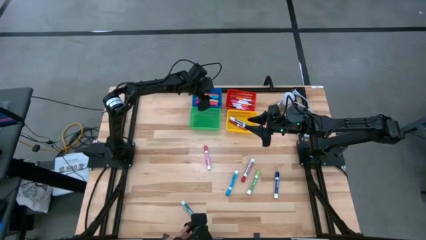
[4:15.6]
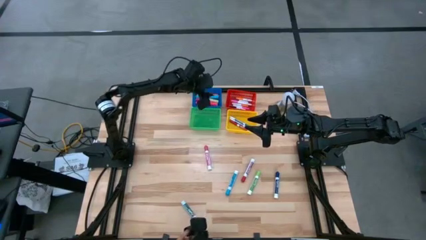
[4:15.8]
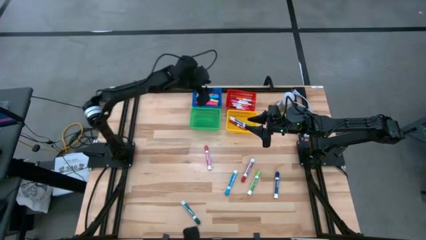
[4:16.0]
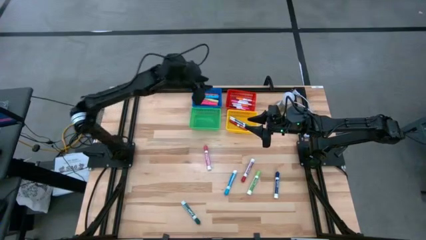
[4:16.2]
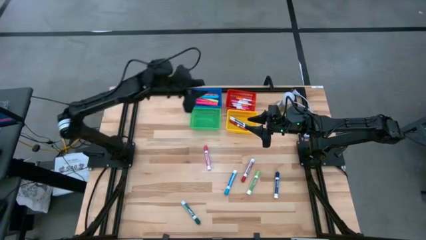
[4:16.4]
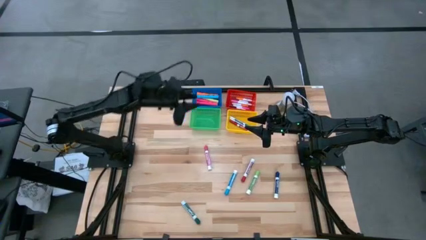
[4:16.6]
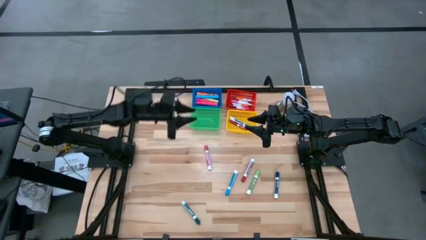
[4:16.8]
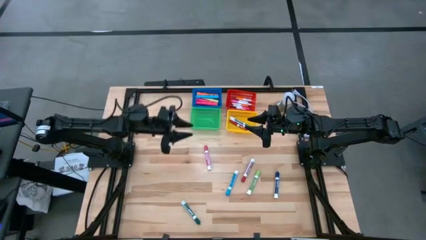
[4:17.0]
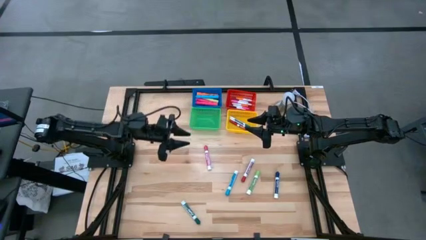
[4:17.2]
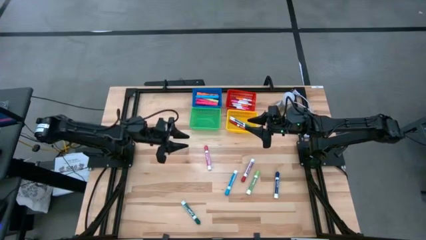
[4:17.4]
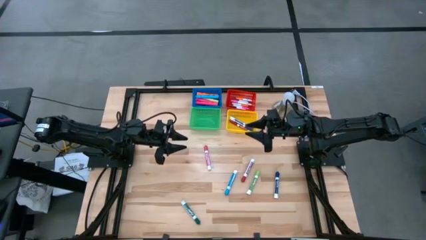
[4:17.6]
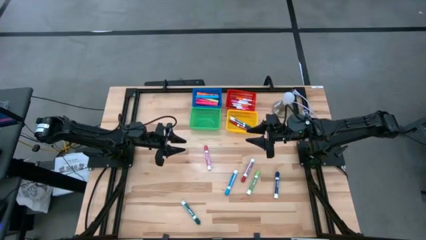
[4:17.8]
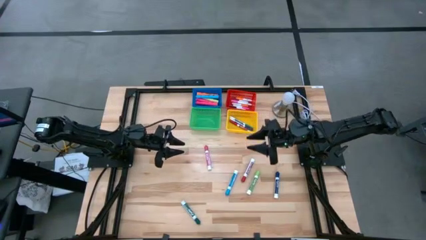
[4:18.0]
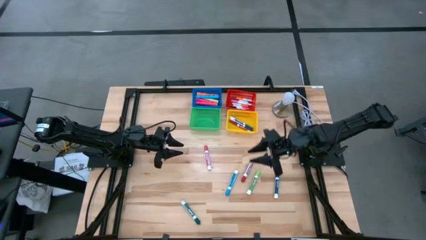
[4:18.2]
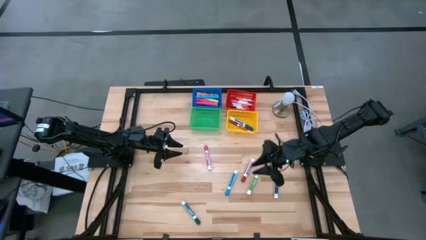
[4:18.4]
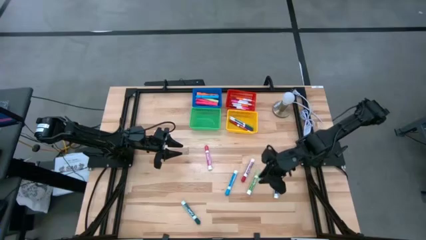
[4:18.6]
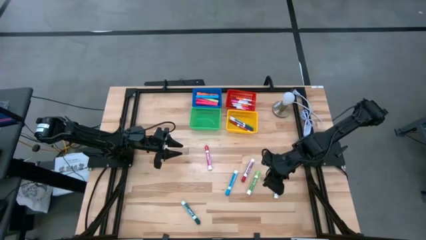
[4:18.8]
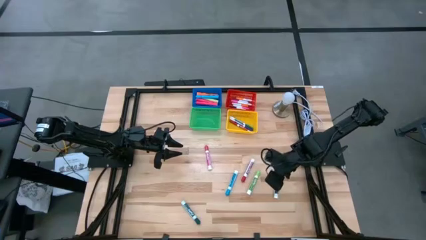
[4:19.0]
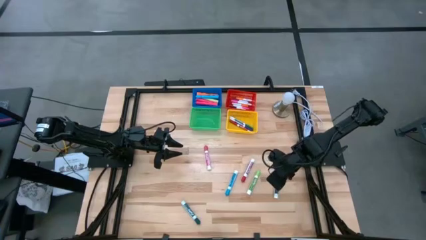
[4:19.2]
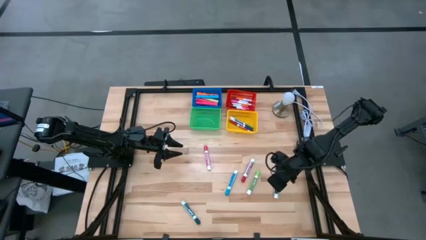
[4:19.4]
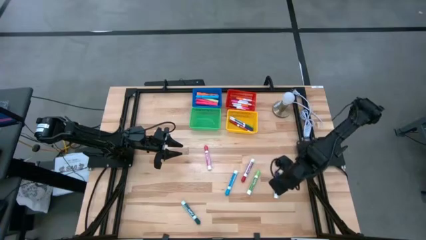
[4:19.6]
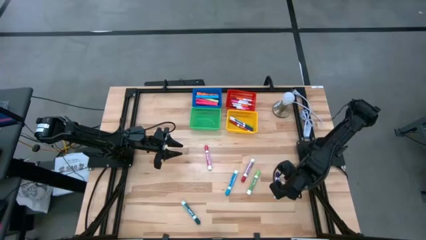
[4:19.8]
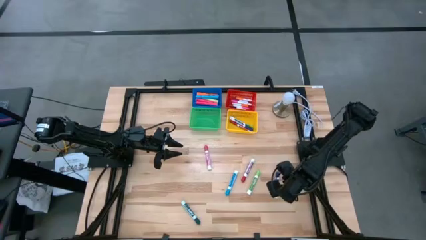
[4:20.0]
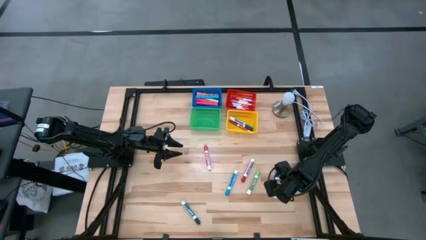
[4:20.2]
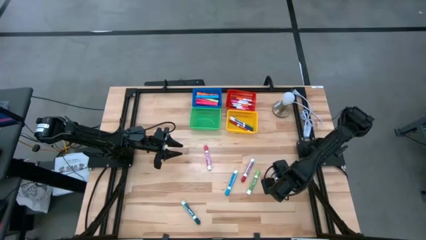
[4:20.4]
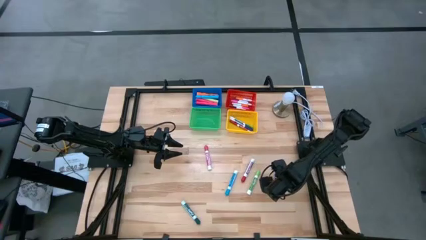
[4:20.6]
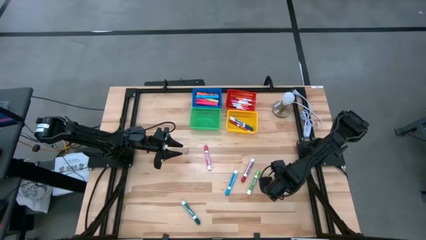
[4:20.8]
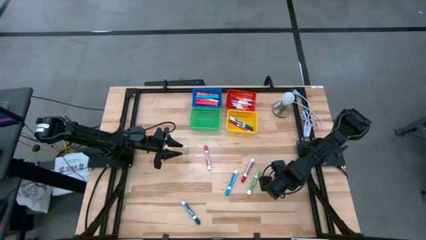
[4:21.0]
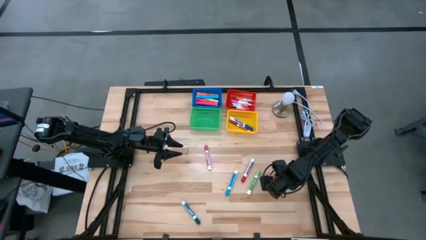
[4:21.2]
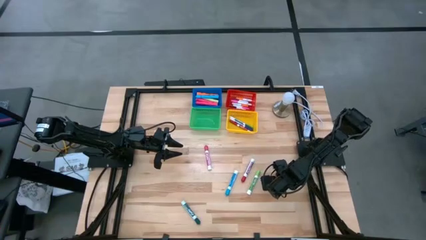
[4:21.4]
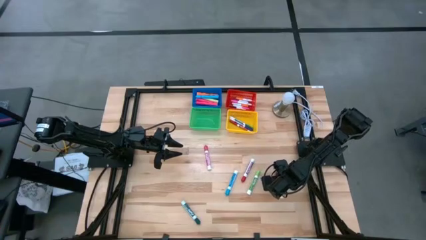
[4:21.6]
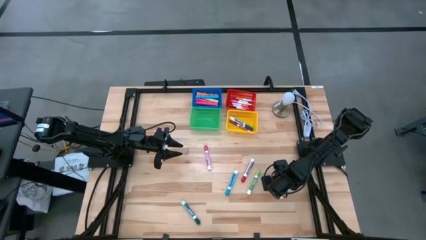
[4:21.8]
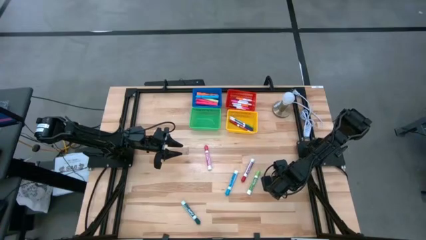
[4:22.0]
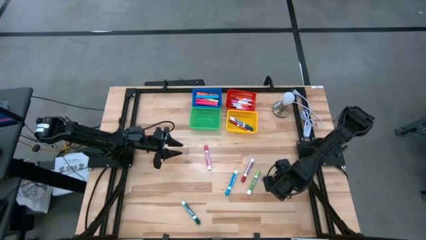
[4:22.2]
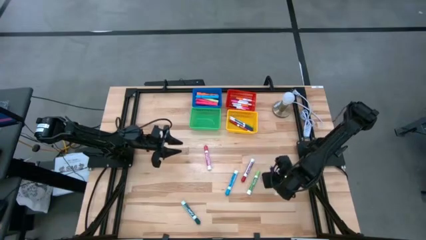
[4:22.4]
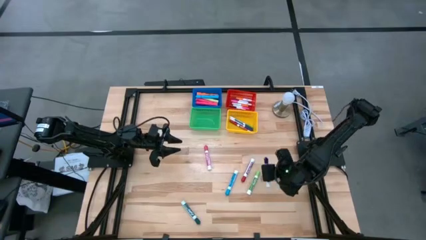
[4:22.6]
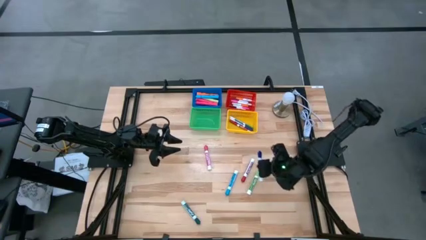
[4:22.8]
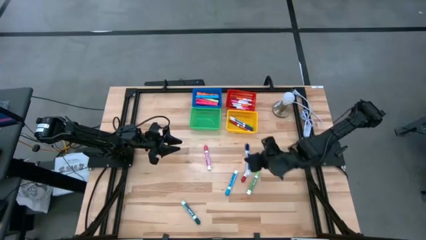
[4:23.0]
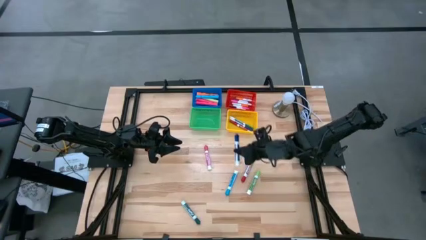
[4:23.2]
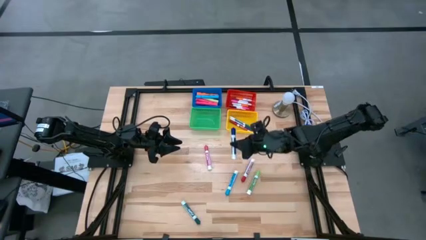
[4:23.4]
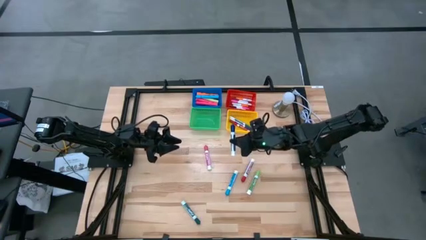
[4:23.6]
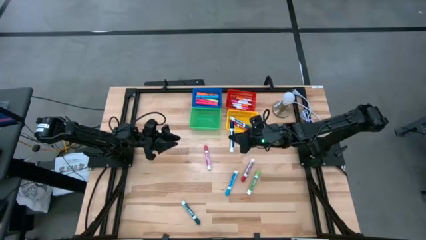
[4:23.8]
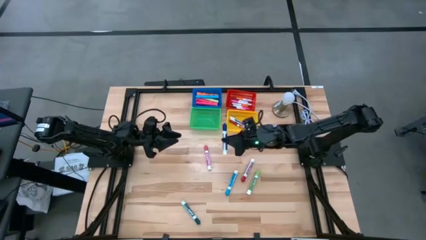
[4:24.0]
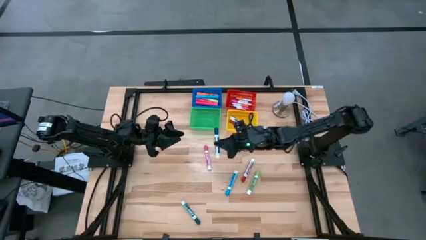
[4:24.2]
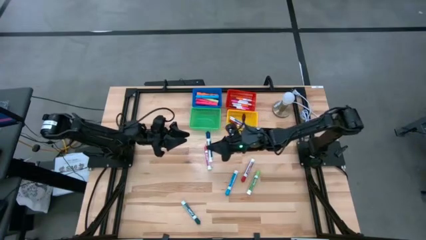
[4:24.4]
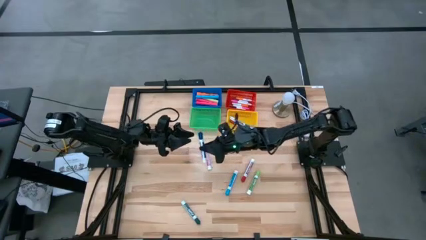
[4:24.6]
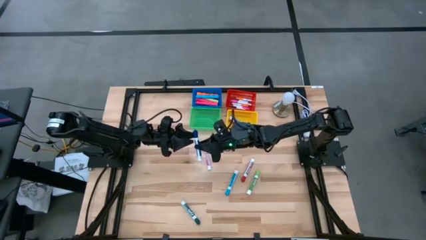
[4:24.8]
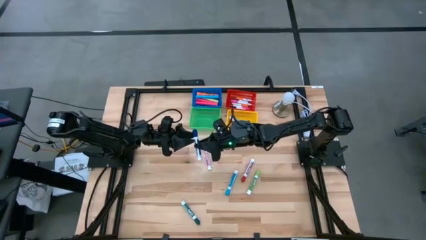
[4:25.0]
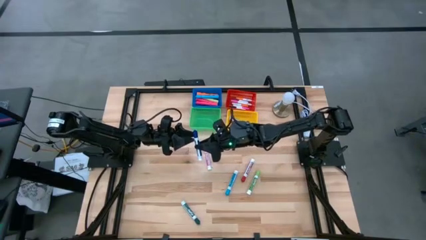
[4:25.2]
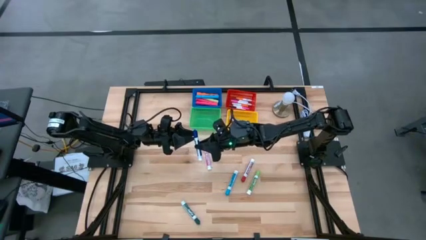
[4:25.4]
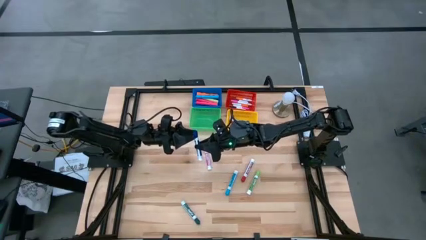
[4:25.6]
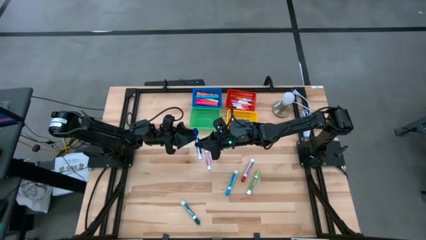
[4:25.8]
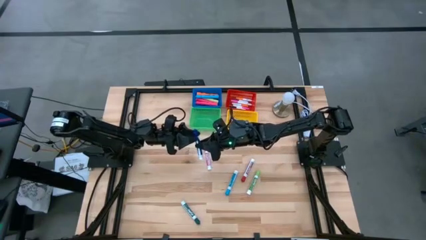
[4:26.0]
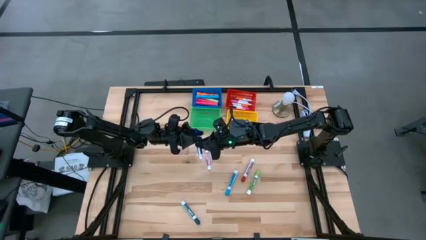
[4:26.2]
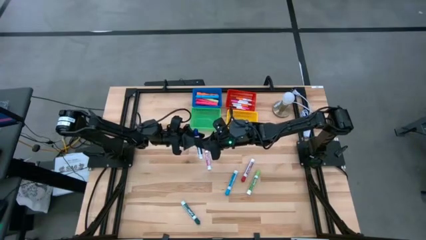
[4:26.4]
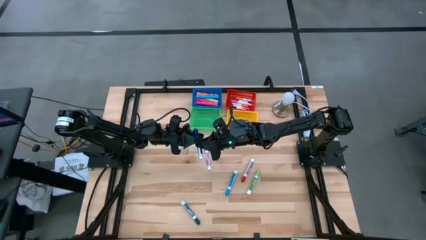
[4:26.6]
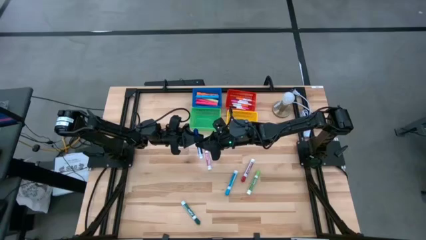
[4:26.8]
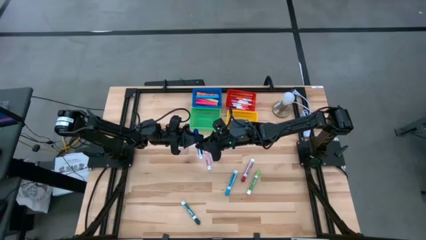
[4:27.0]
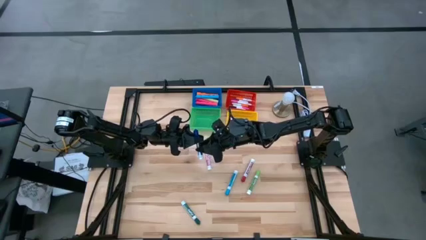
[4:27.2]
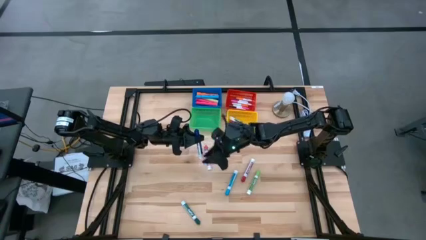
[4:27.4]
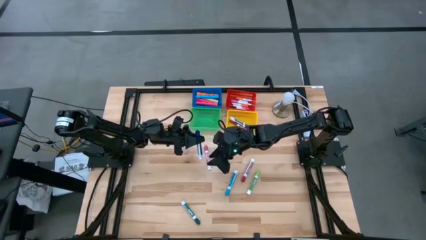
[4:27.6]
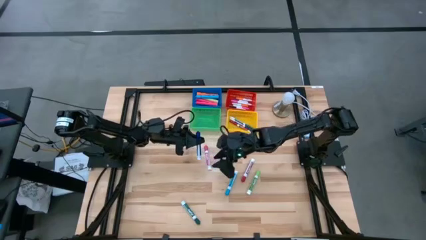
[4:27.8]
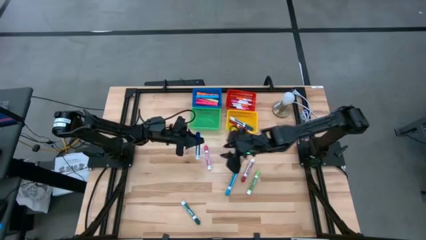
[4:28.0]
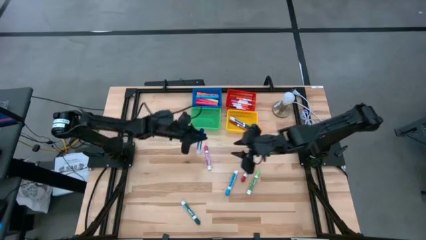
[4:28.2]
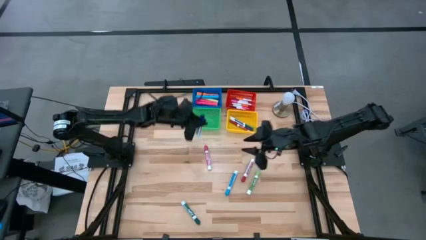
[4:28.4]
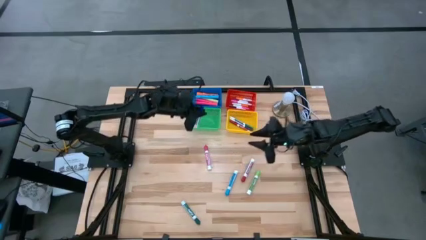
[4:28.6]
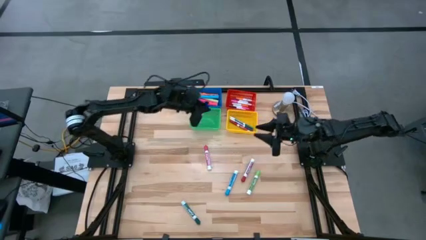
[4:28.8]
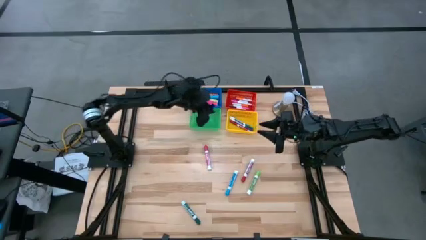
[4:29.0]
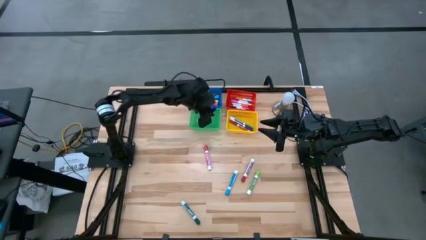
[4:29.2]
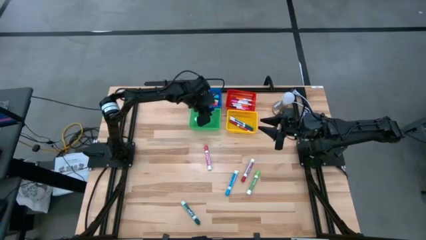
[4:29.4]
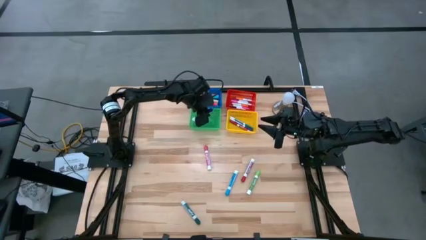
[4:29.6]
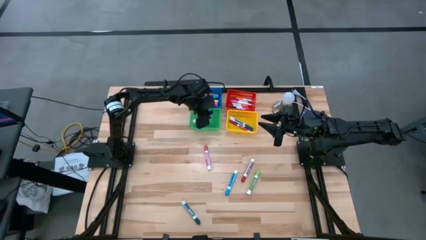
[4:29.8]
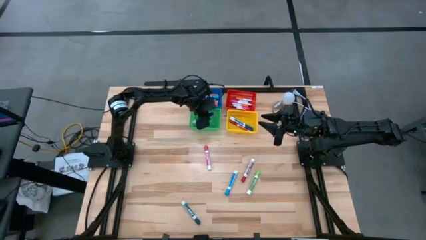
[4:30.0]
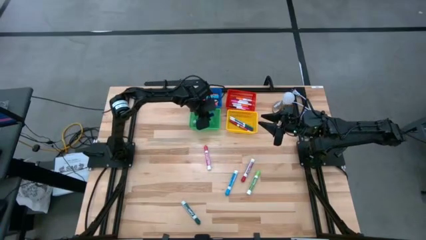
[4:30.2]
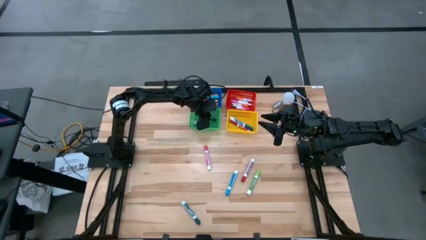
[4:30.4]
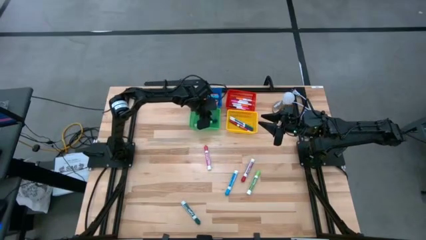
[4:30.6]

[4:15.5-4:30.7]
Task: Pick & Place Markers
Put the large dark blue marker into the green basket
